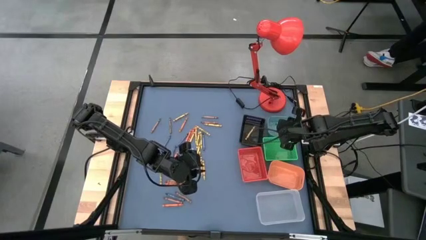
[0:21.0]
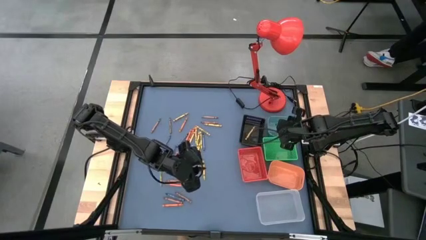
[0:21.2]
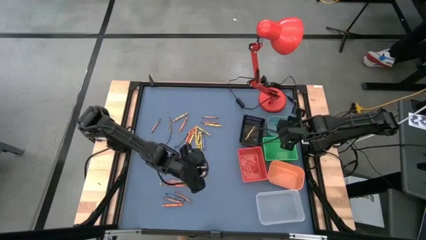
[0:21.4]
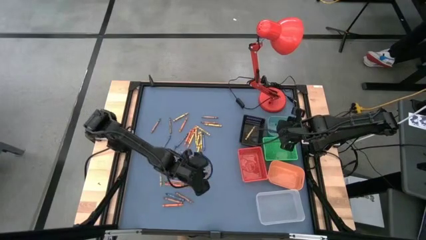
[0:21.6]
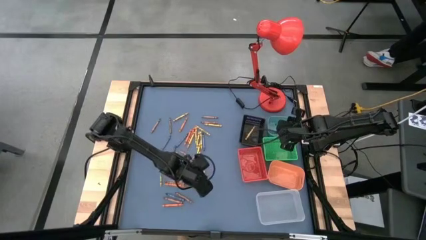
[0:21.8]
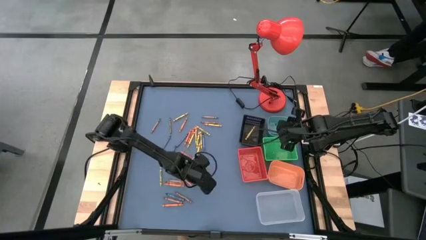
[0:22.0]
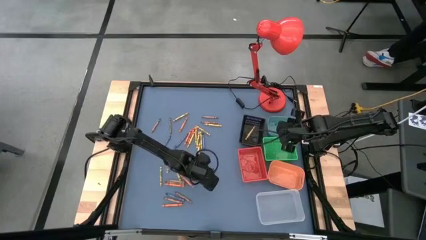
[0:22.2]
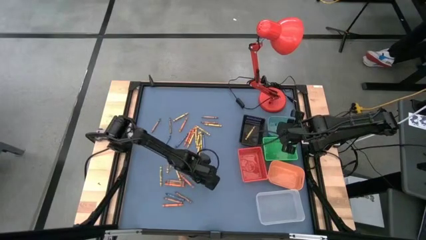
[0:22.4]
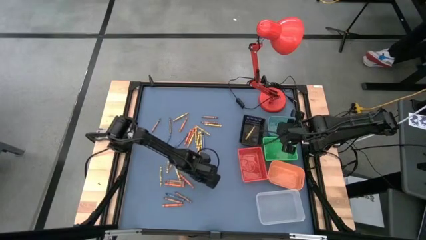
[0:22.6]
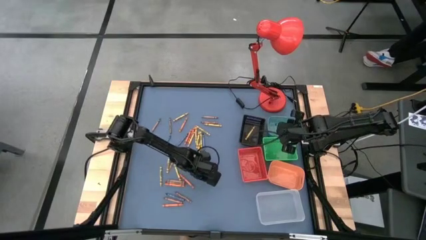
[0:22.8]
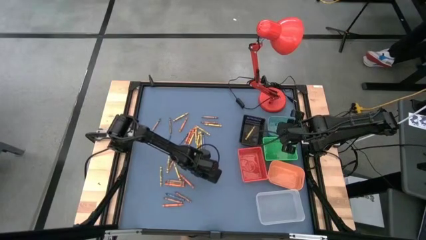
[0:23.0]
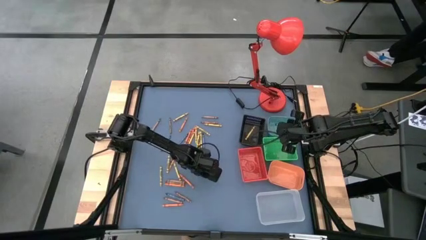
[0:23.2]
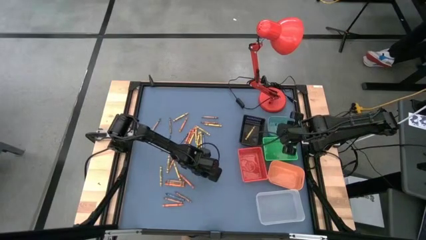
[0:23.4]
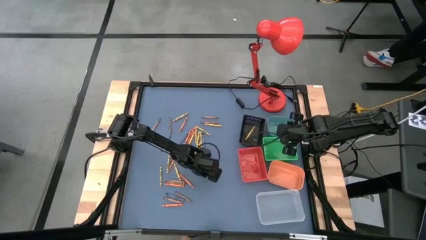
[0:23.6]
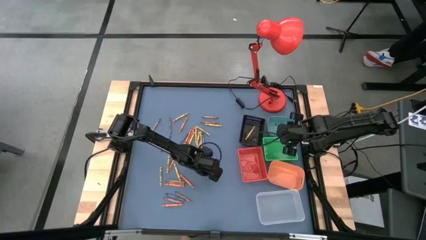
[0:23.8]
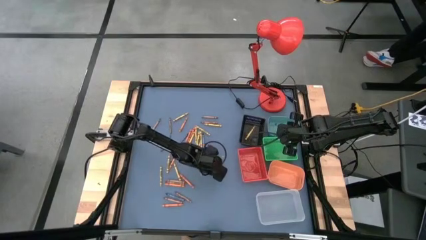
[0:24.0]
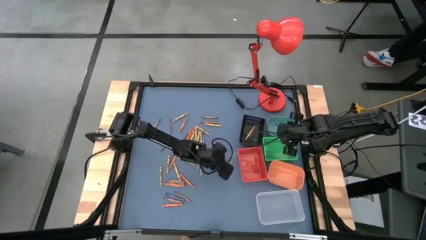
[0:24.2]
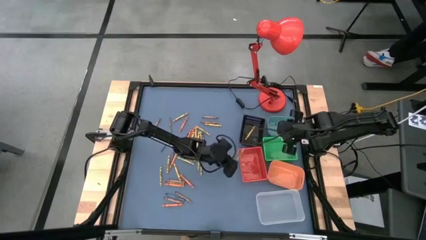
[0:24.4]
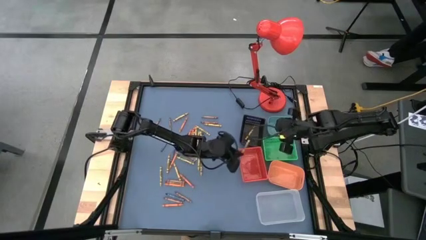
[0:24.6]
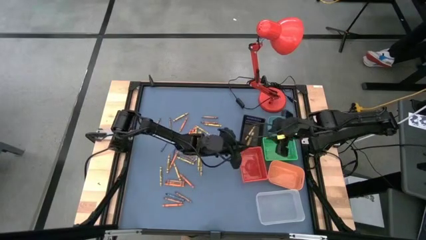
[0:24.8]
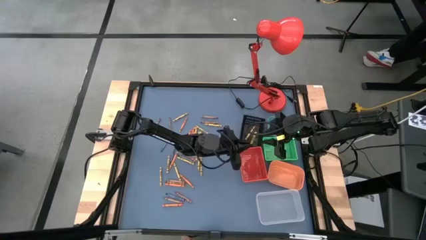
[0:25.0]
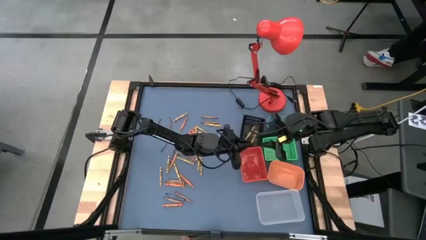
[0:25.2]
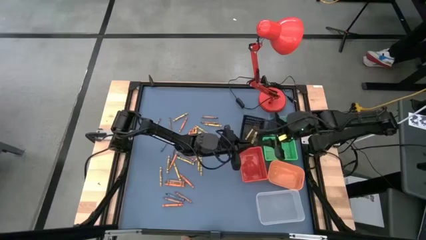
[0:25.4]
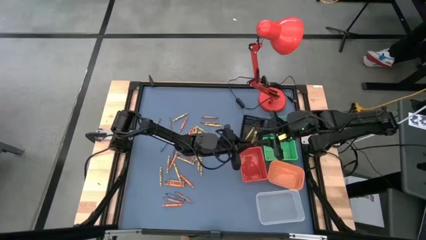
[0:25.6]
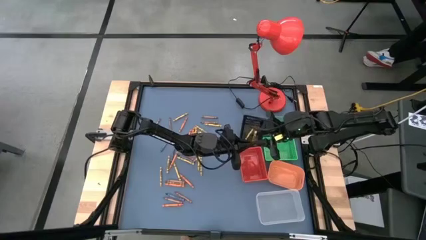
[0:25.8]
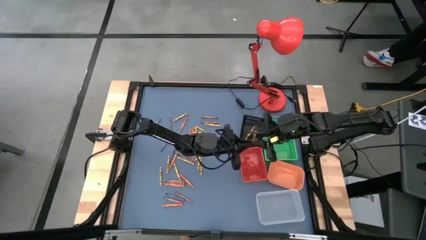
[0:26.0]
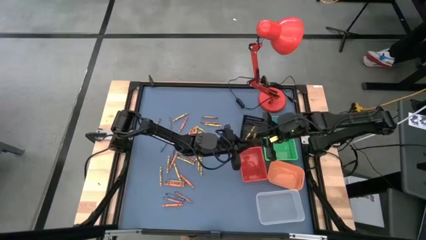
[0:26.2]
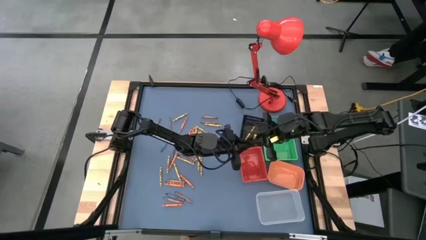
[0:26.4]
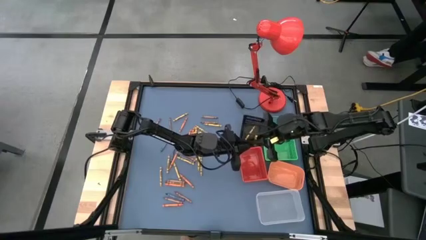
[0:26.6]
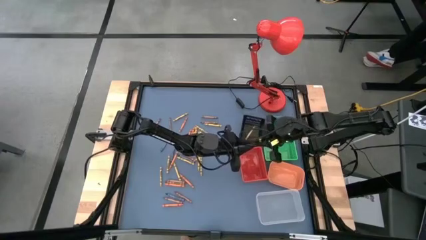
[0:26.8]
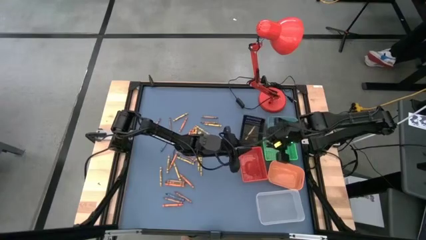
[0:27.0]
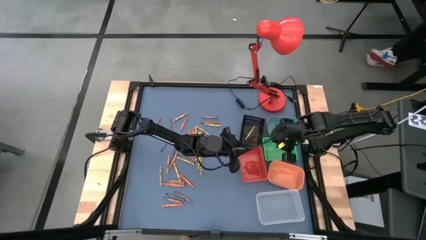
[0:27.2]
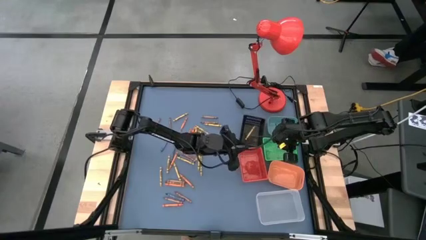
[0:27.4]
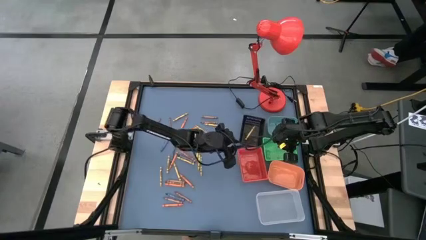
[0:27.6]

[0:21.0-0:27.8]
Task: Sort crayons
Put the yellow green crayon into the green basket

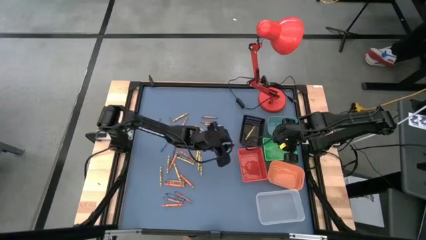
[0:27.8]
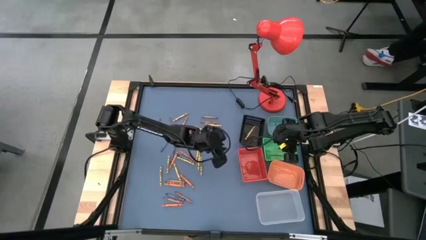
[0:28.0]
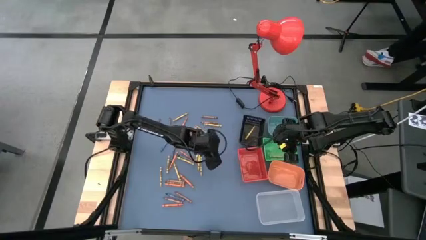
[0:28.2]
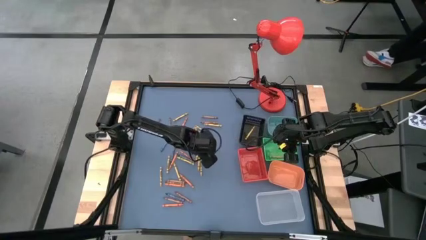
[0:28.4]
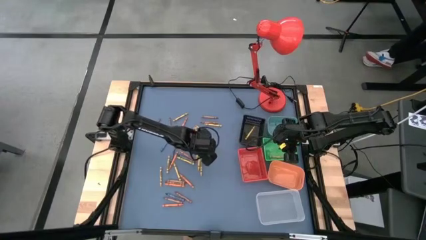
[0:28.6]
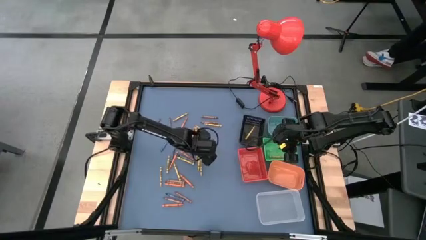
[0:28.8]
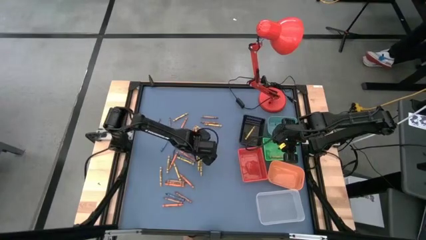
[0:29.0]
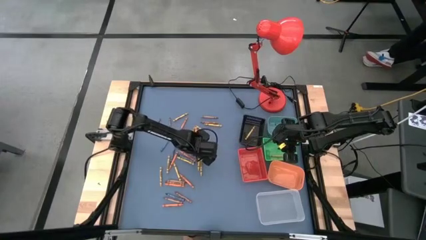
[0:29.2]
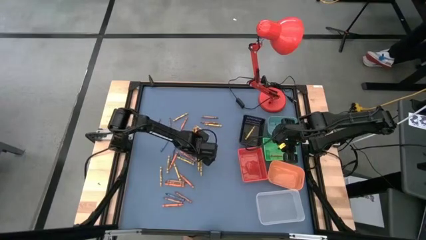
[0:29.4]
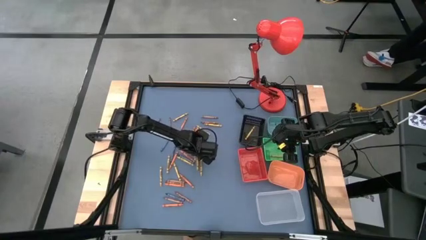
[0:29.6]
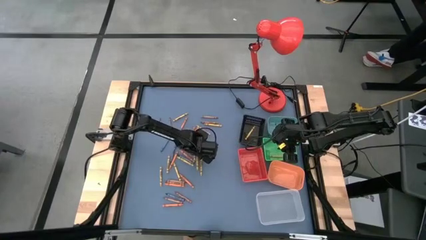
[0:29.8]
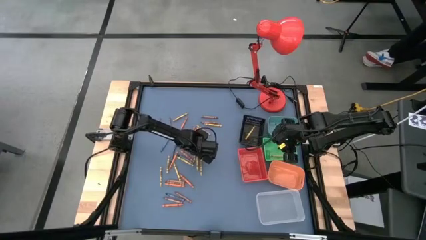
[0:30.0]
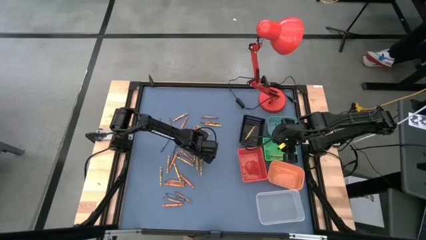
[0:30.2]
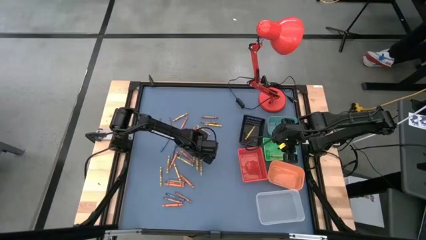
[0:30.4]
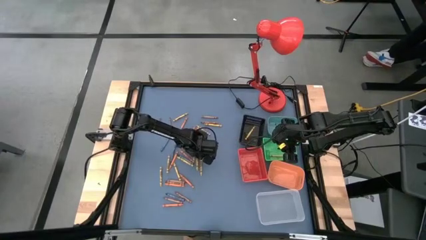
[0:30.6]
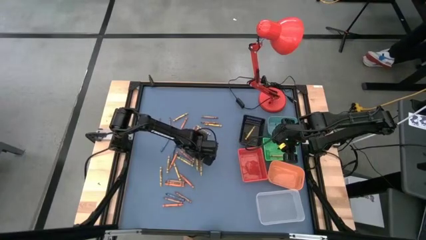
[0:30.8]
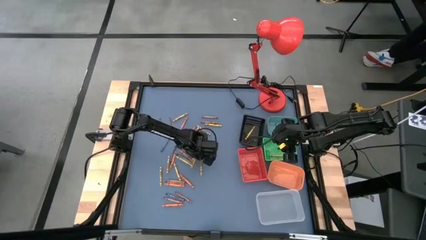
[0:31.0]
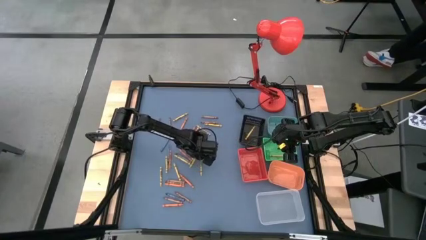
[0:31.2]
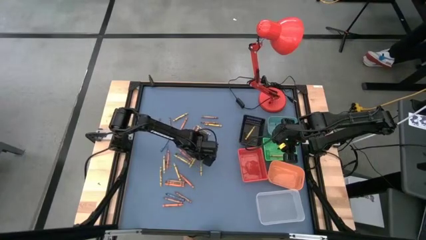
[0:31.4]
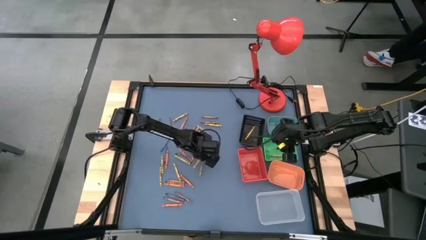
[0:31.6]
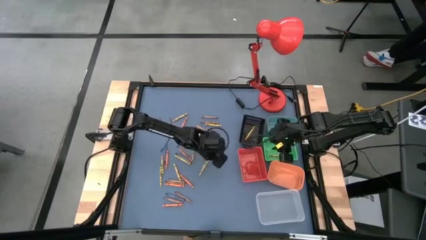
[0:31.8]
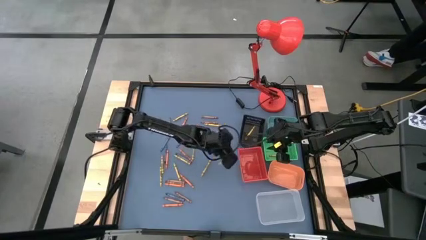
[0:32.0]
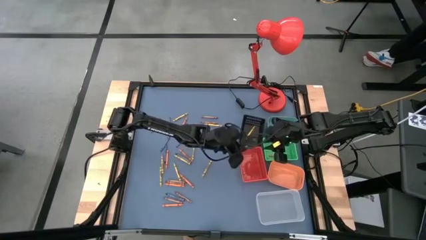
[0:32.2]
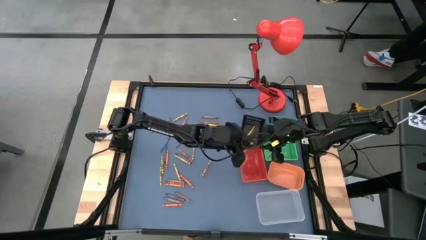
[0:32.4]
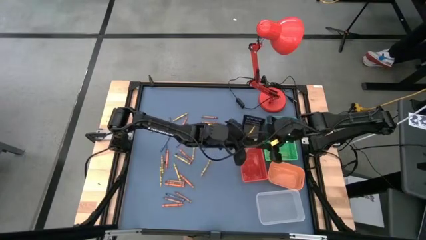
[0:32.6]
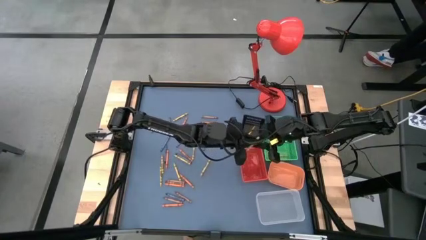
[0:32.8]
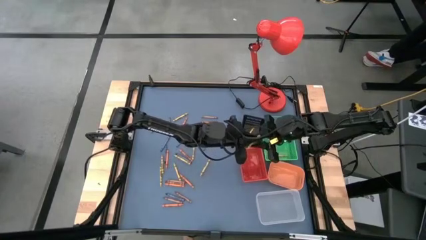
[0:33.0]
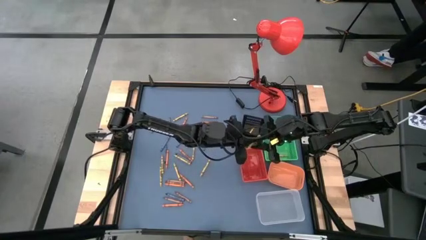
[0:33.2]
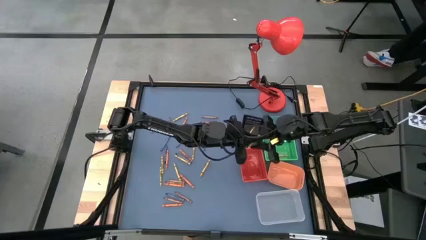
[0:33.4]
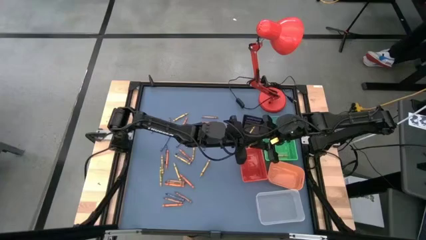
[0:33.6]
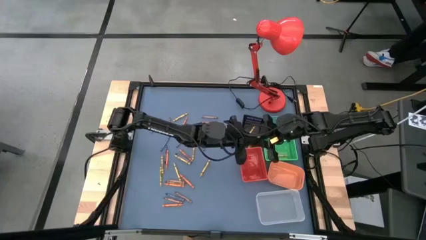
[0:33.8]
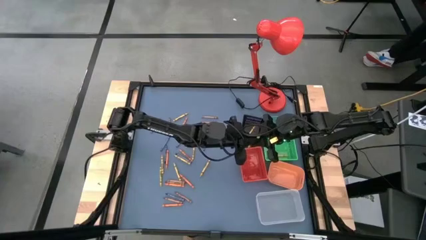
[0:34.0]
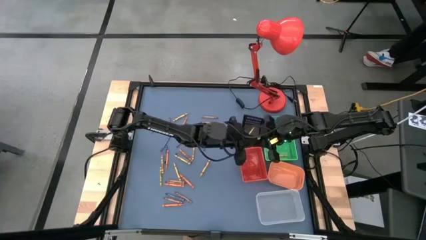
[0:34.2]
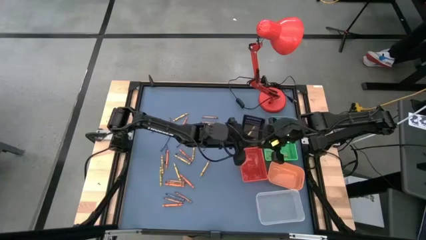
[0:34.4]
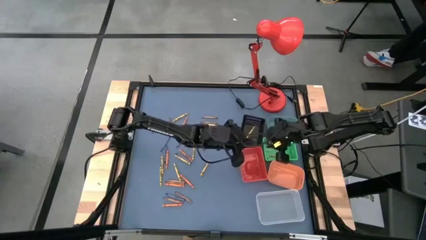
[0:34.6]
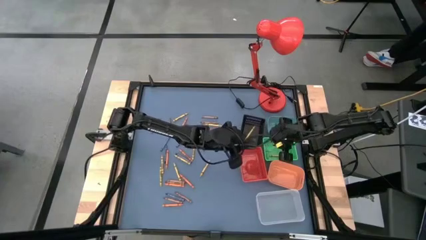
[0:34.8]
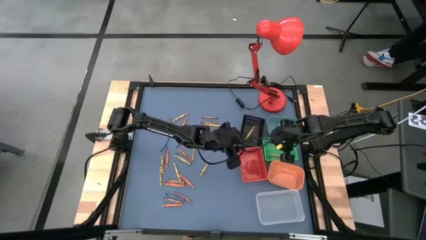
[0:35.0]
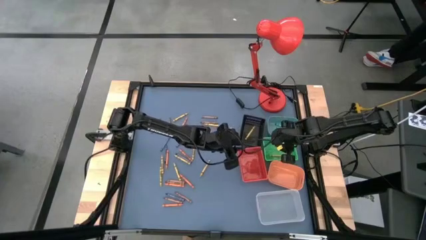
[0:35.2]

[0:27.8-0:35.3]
Put the yellow green crayon into the green basket

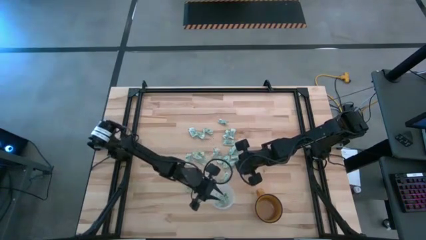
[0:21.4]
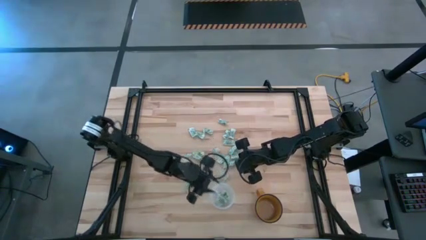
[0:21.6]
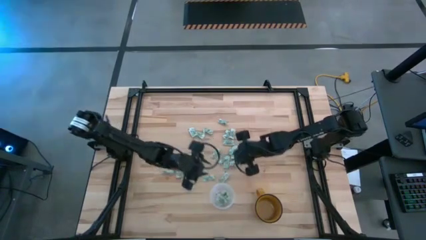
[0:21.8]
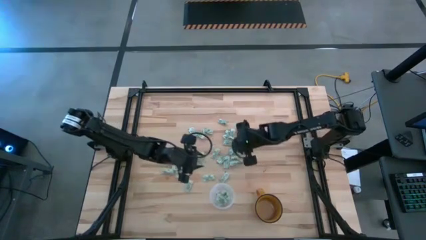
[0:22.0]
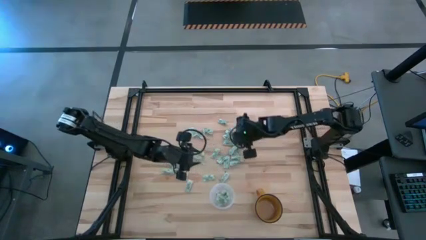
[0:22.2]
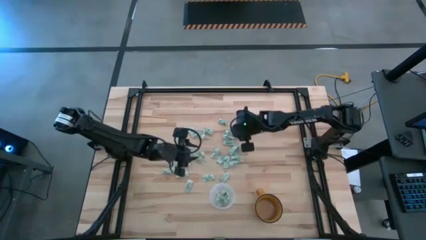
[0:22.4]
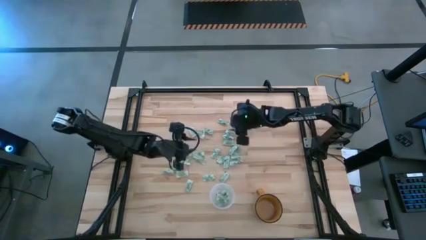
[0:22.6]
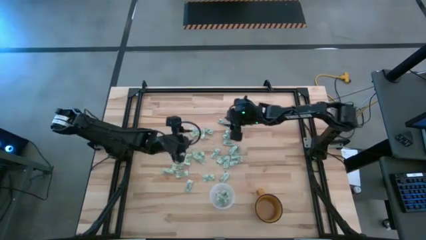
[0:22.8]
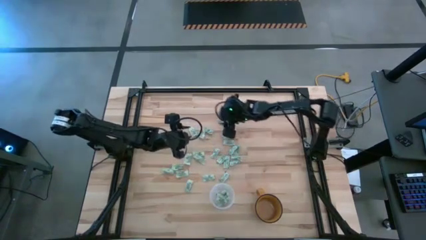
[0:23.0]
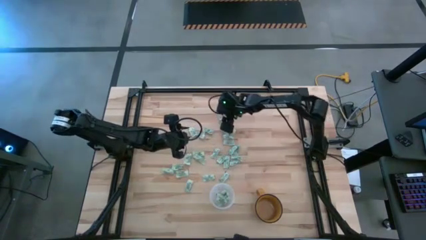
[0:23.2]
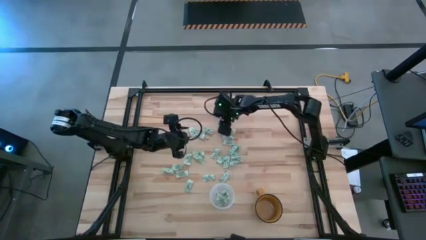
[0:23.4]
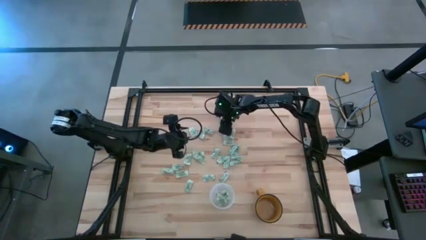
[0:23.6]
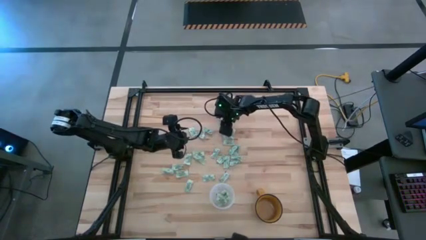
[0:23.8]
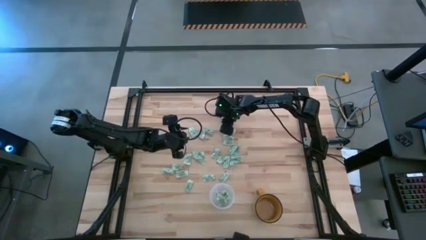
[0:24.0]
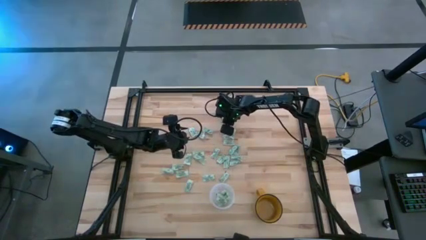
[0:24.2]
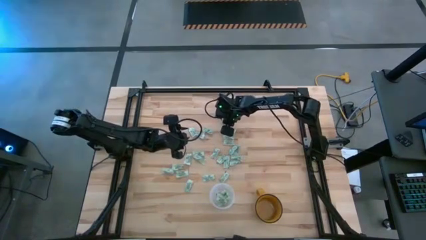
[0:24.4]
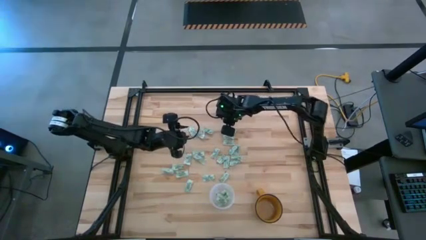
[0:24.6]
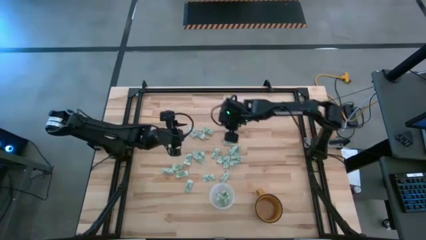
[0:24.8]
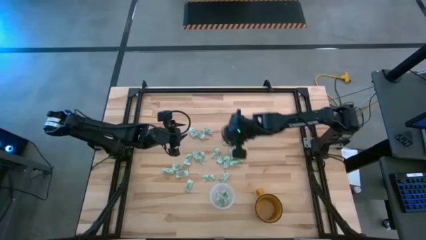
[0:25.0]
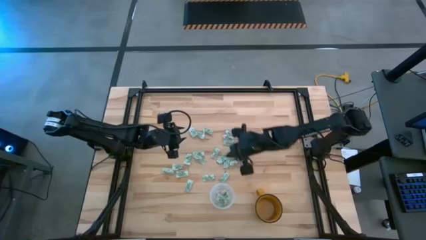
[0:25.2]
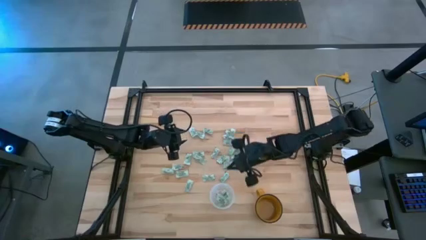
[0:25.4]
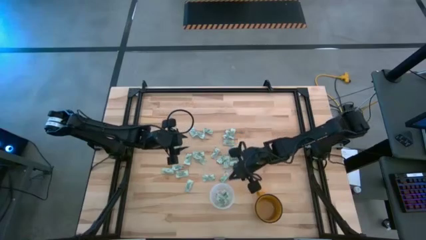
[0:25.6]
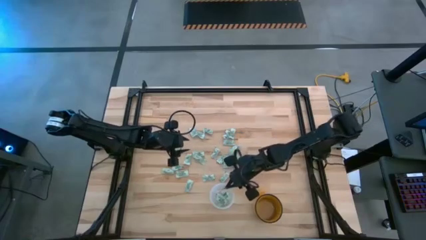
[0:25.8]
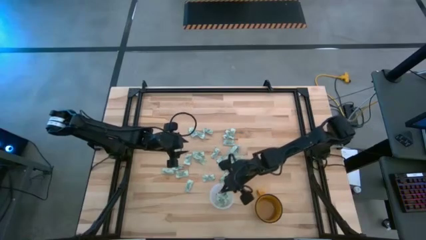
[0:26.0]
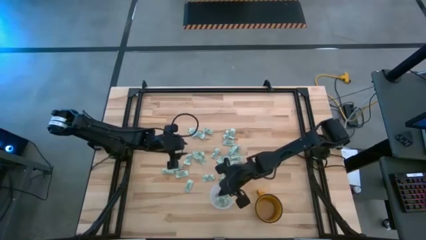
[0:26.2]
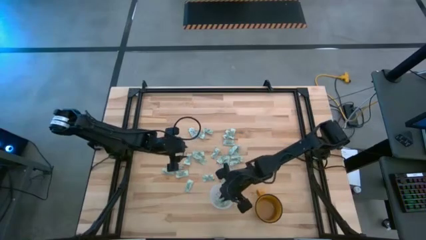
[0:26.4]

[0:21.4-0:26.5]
Task: Pick and place Stevia / Truvia into bins
Put the stevia packet into the transparent bin
